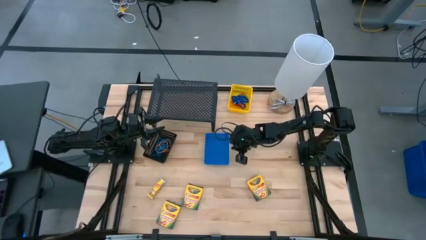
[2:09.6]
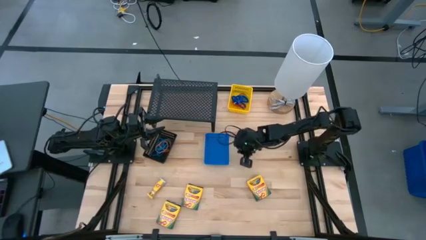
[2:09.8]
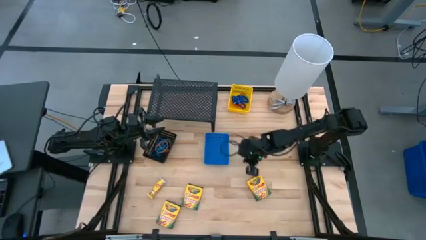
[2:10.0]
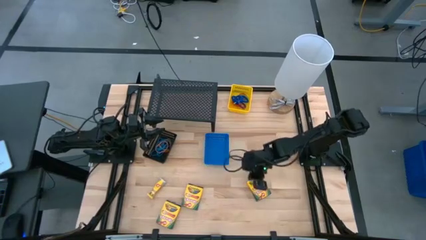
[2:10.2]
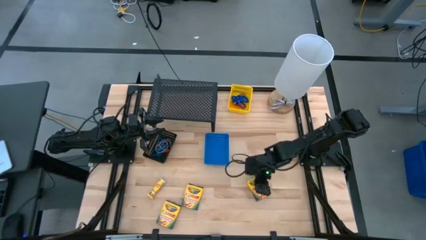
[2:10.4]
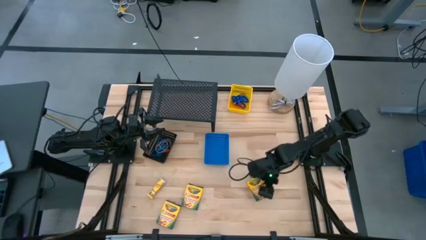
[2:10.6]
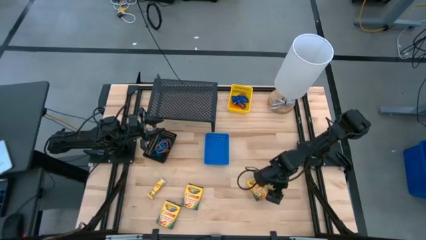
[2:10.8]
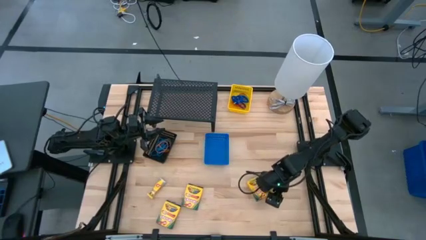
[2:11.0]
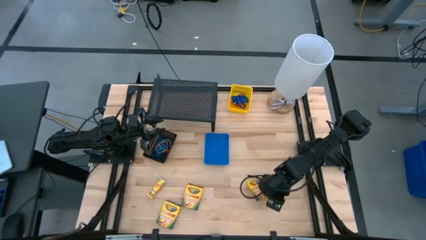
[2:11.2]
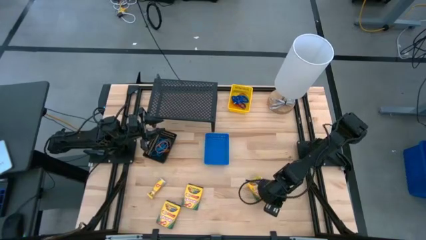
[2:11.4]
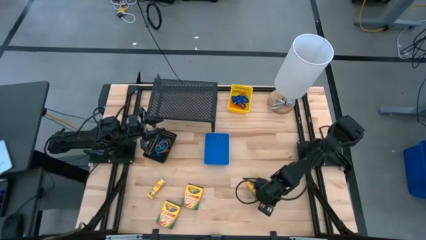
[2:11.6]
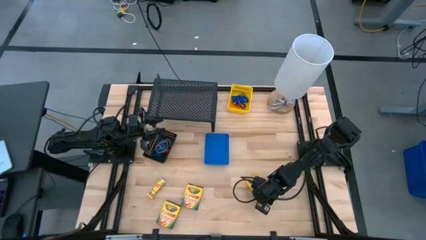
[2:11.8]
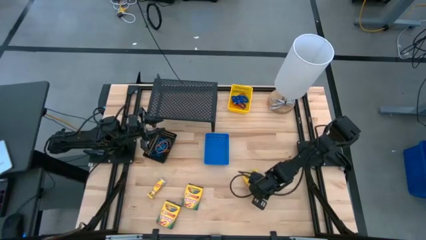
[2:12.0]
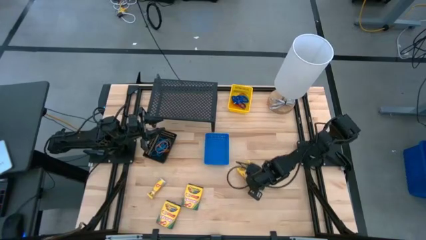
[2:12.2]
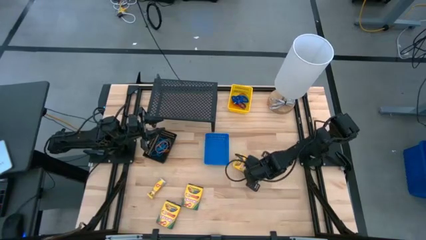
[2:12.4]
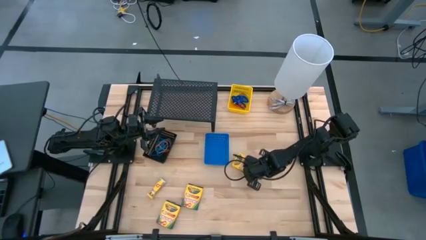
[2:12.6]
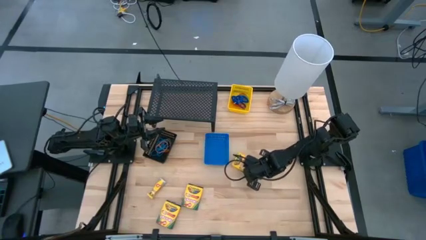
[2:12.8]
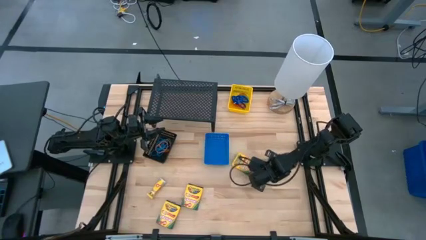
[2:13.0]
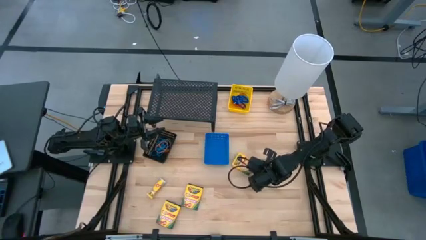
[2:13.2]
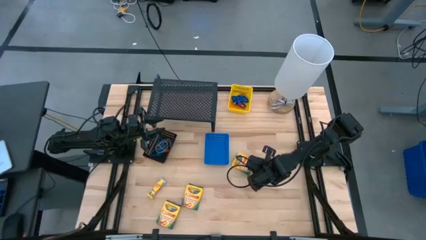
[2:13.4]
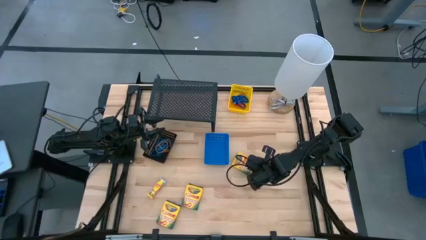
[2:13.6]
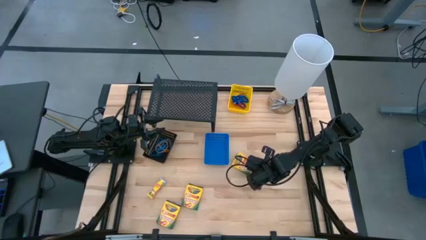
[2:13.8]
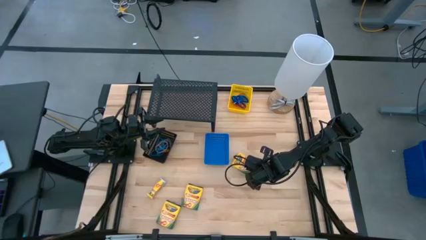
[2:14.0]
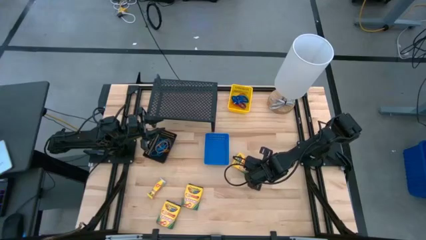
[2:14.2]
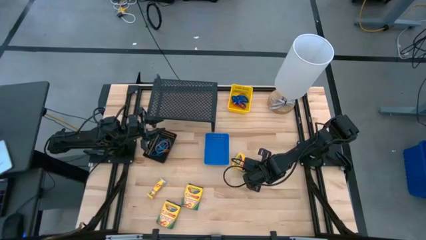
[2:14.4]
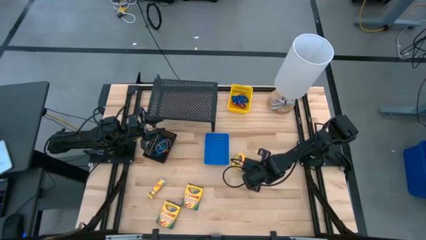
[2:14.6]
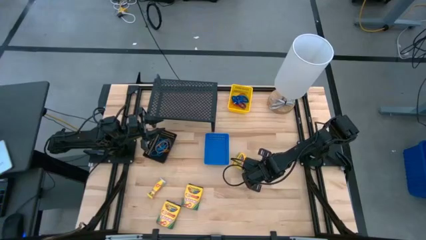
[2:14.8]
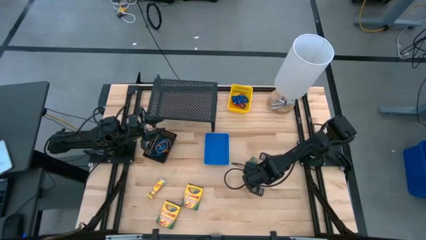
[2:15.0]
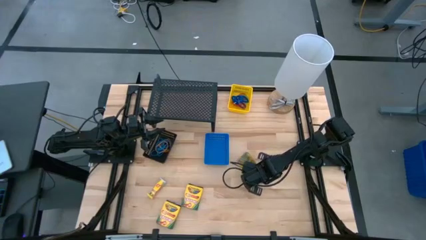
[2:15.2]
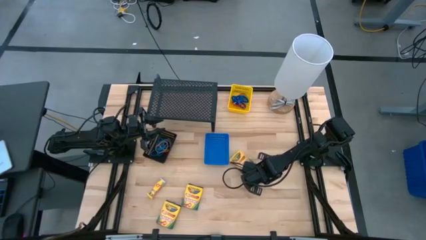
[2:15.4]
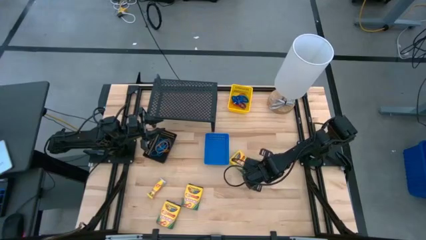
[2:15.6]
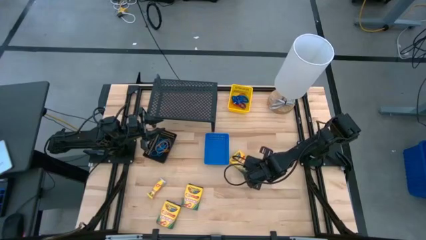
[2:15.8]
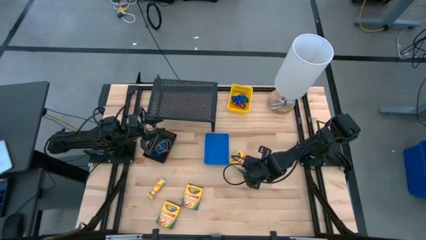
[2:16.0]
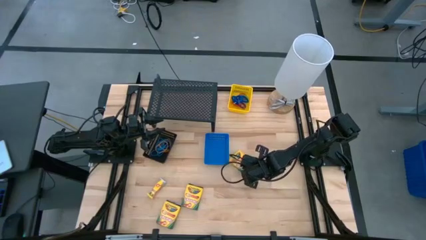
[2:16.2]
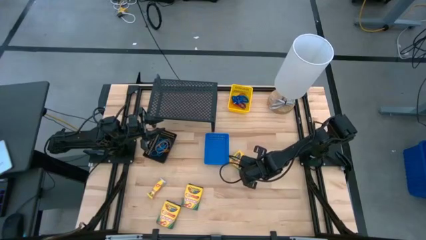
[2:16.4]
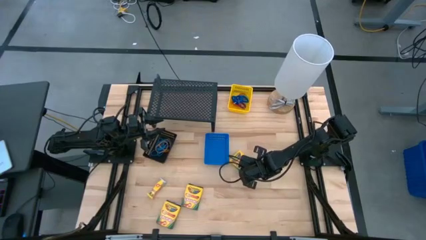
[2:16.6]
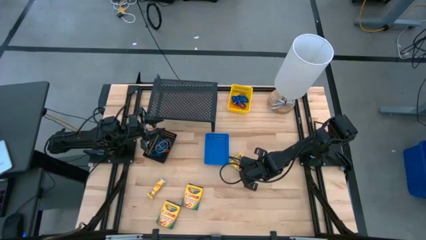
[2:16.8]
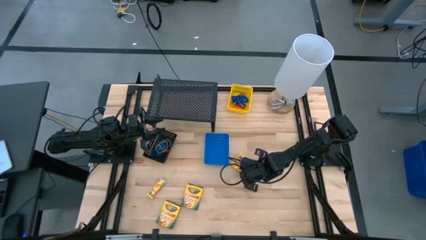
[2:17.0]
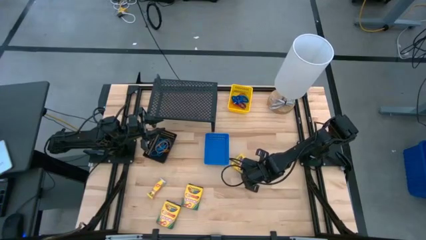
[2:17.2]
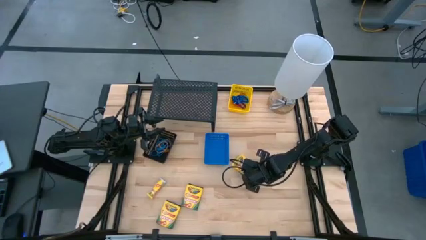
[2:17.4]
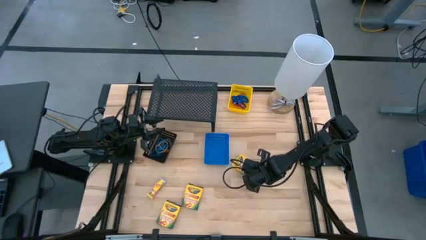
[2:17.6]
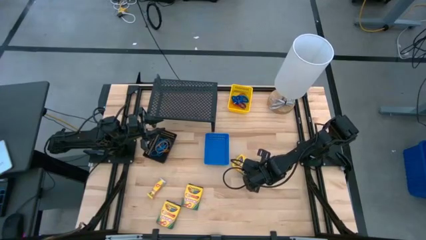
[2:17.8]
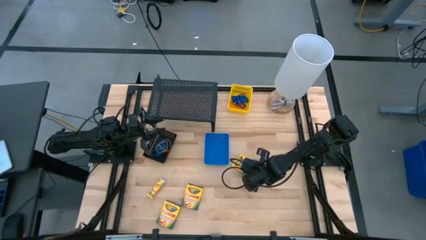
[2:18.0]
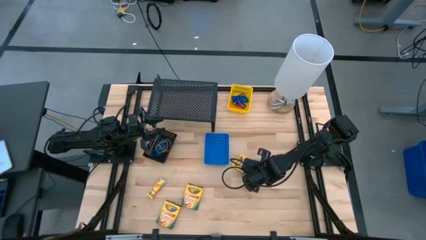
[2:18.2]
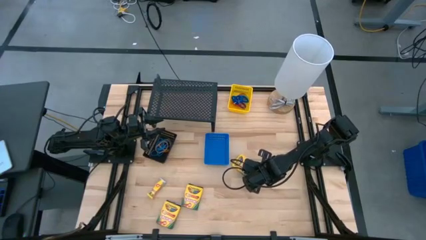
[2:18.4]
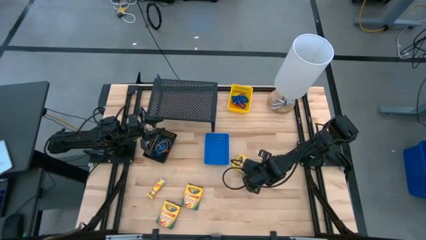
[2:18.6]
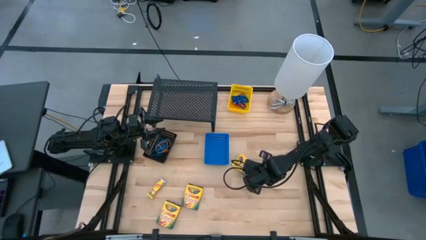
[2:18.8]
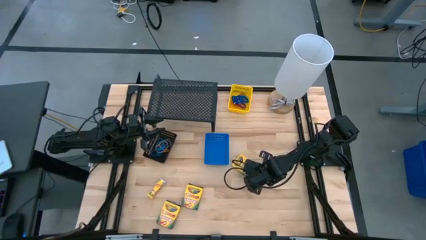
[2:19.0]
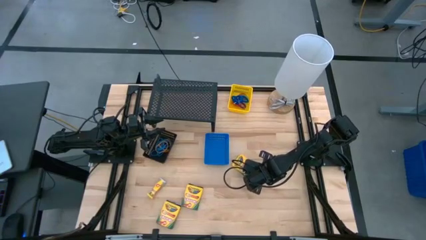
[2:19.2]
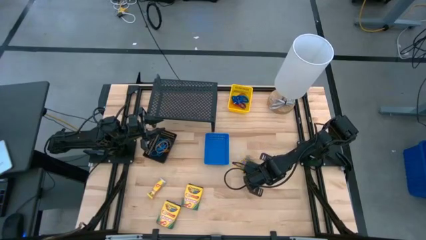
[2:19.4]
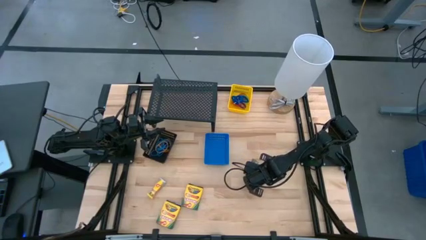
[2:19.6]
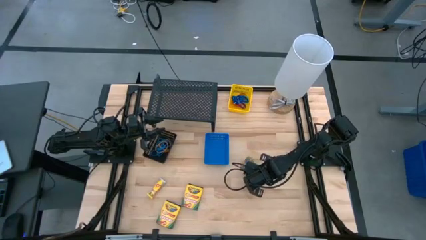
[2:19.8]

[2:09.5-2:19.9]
Task: Pick & Place Office Desk Supplies
Put the top right large yellow crayon box into the blue bin

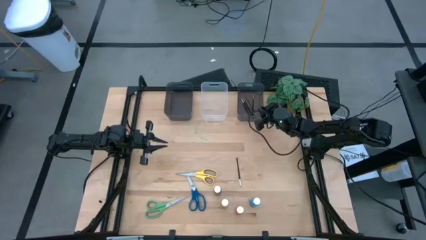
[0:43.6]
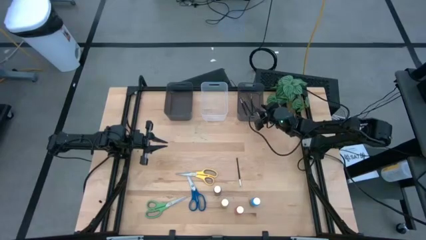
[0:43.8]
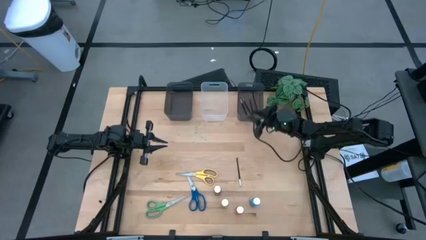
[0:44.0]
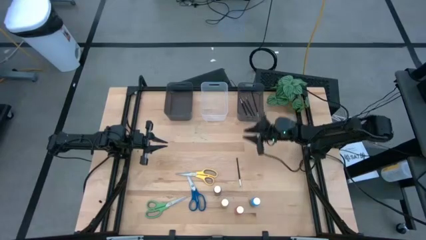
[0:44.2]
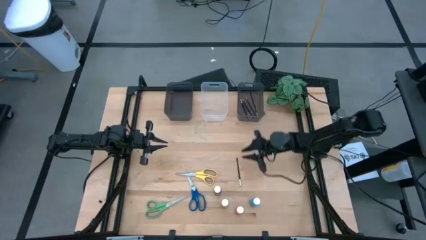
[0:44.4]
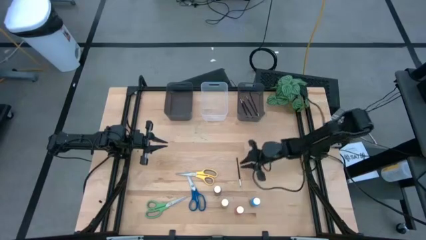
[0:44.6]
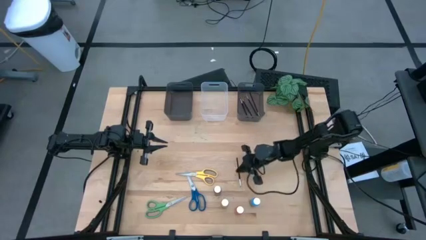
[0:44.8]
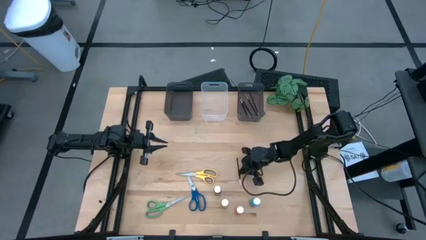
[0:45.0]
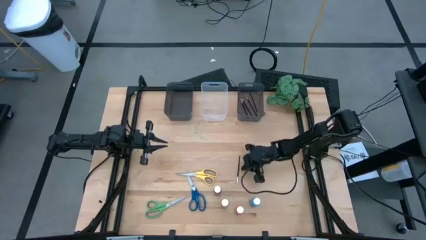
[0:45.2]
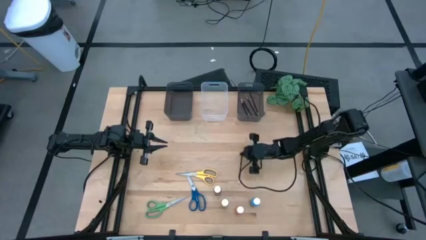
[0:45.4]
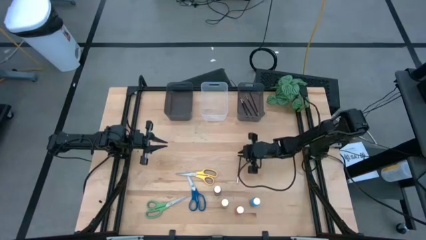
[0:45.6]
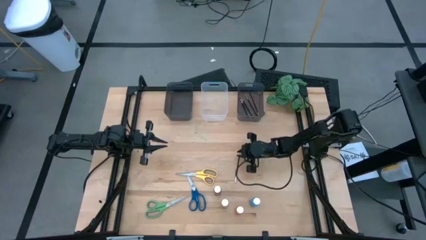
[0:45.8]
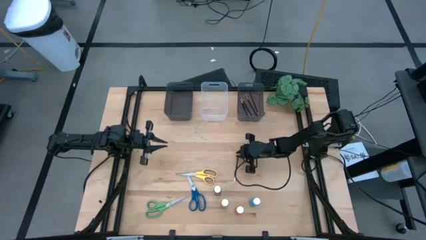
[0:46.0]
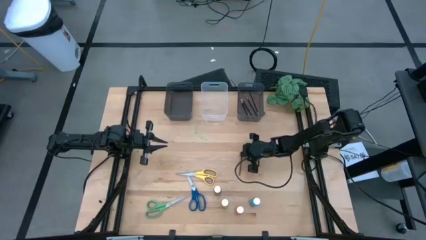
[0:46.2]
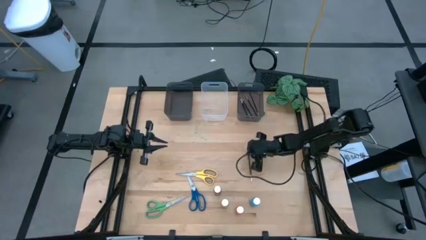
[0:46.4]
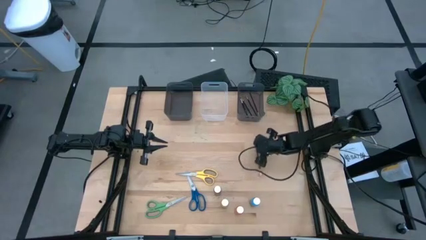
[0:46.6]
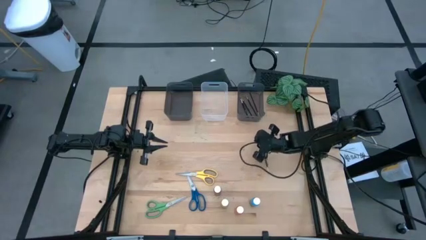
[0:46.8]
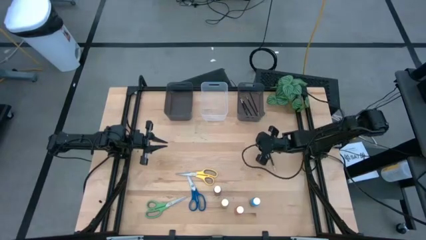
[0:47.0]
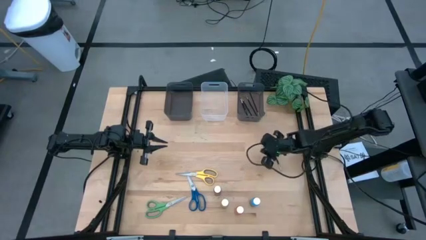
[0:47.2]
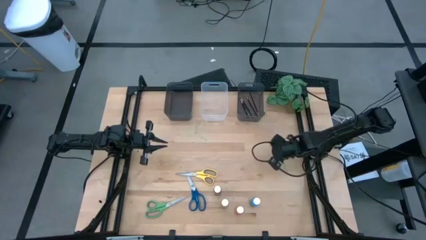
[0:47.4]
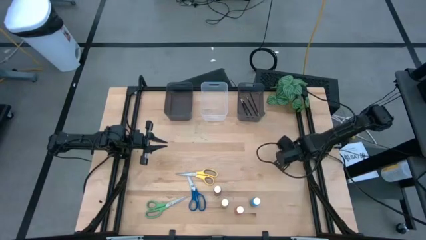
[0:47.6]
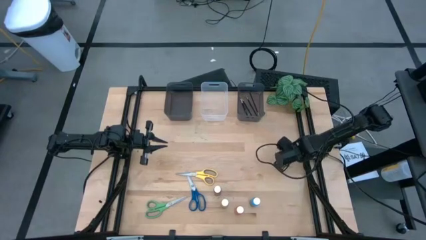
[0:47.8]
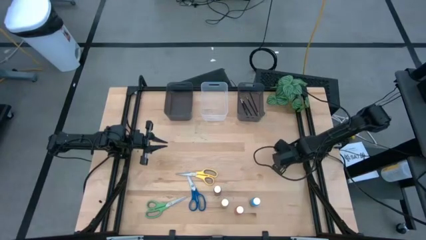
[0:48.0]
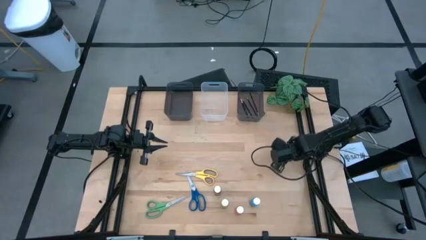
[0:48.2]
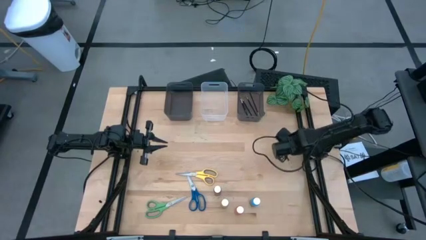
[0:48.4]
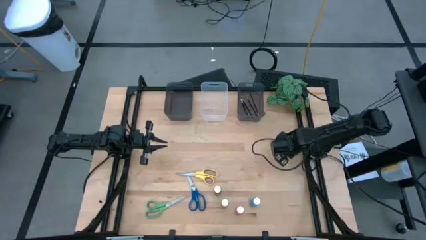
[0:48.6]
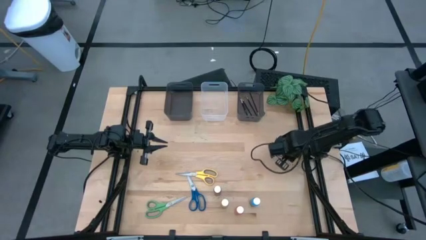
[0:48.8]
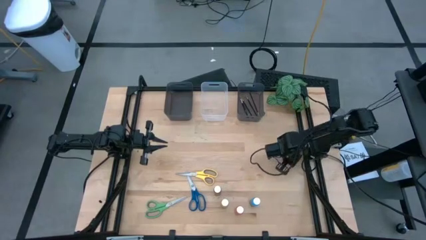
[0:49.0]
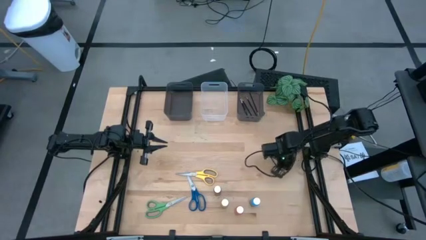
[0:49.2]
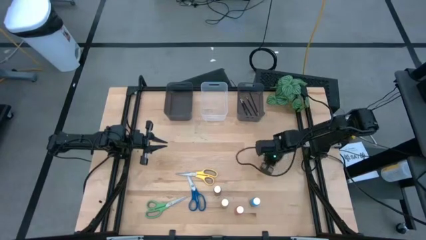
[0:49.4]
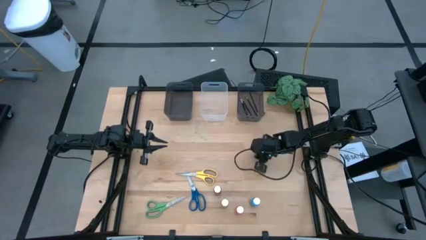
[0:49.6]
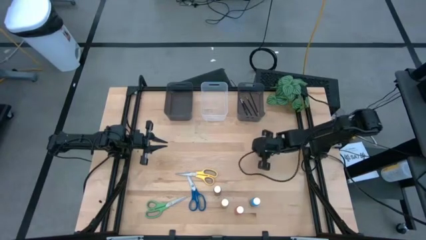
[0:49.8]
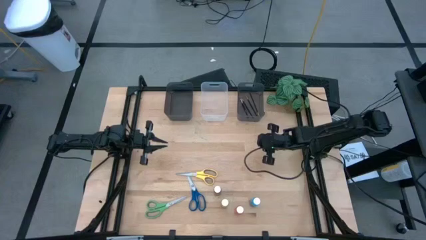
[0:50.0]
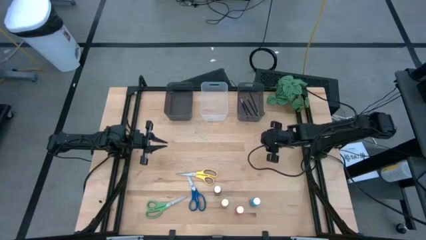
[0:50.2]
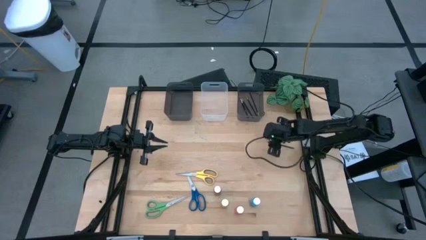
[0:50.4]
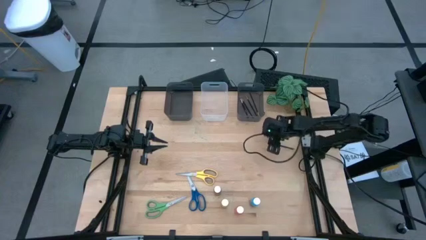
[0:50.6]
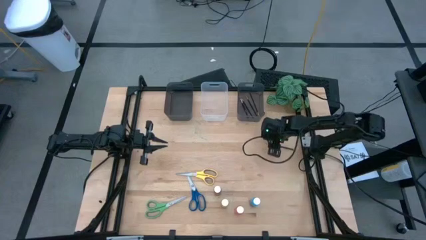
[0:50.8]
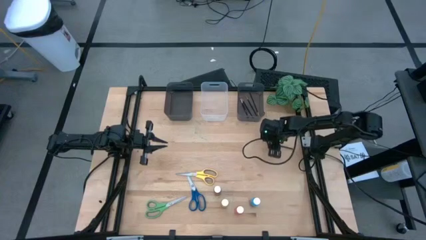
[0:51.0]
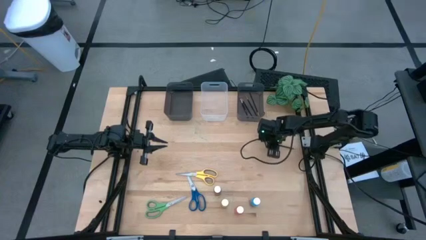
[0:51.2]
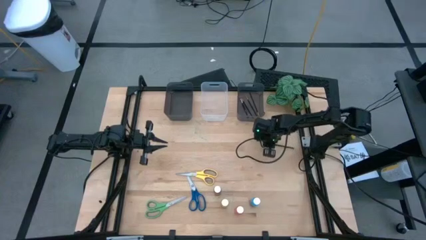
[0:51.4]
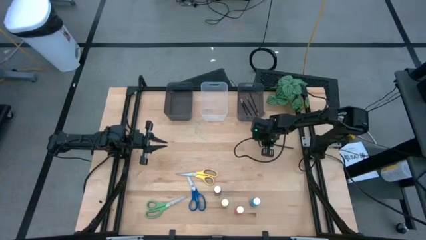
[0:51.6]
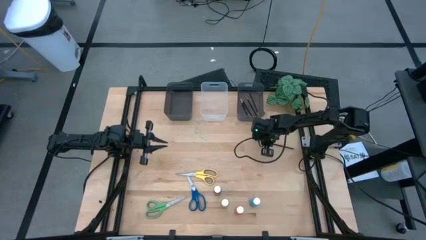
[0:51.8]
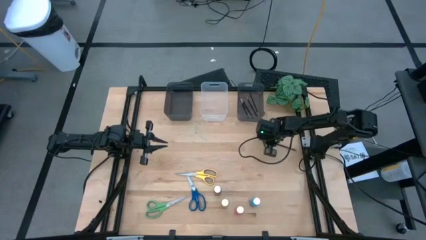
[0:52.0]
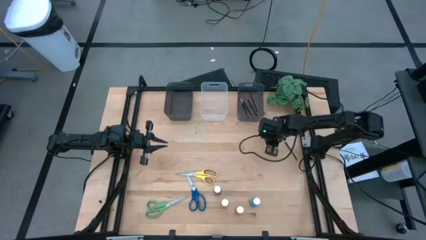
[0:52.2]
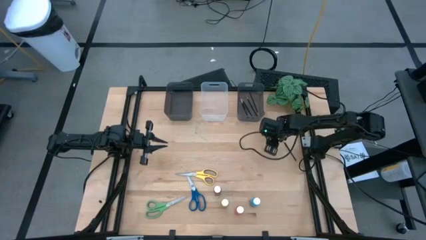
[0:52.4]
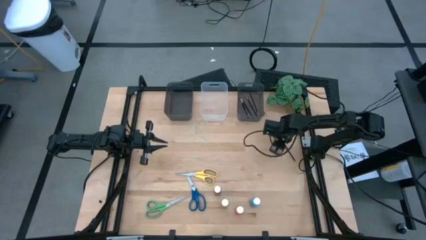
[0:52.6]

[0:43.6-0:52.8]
Task: Pick & Place Paint Supplies
Put the black paintbrush into the right black bin
